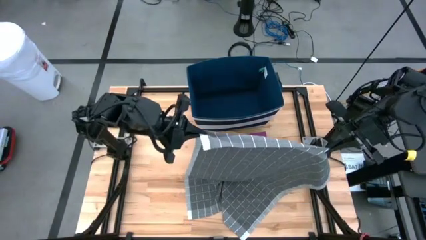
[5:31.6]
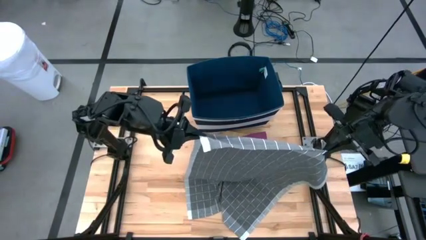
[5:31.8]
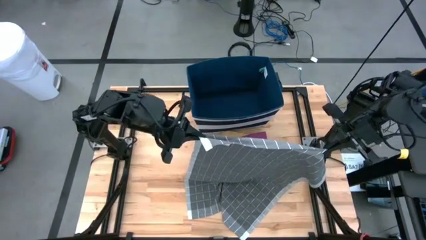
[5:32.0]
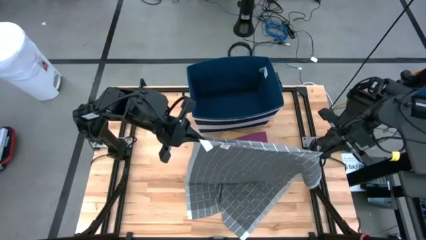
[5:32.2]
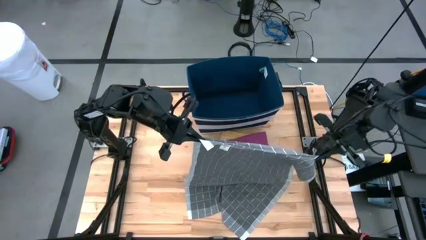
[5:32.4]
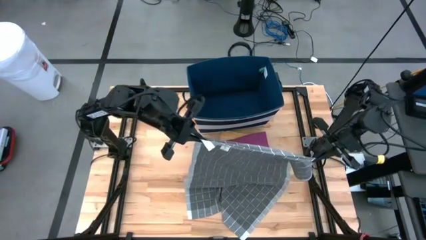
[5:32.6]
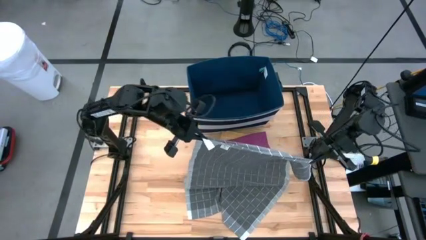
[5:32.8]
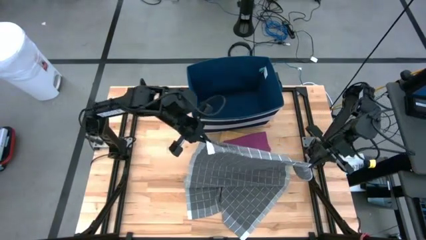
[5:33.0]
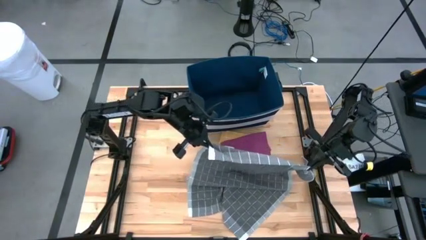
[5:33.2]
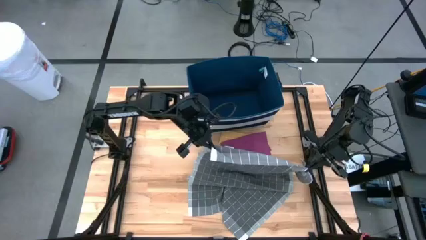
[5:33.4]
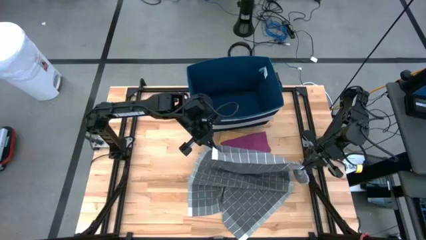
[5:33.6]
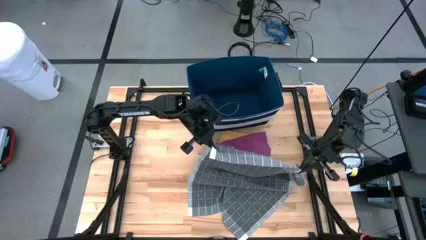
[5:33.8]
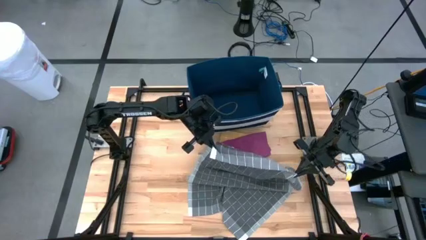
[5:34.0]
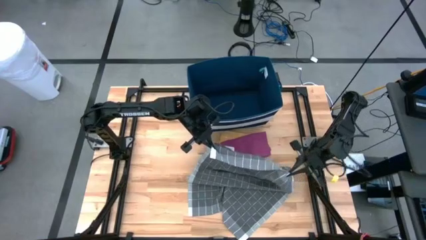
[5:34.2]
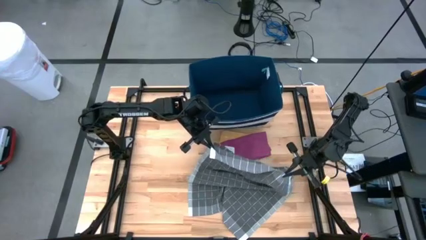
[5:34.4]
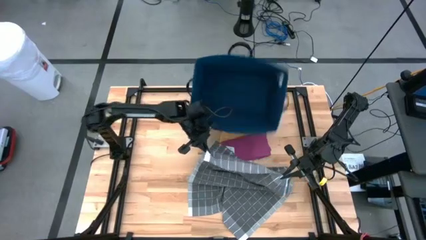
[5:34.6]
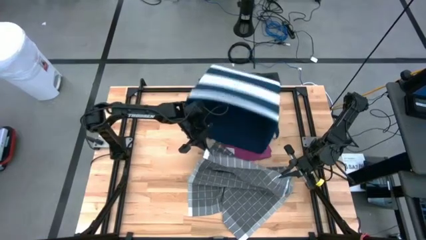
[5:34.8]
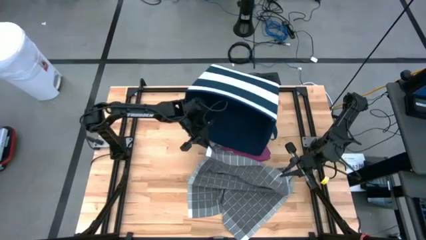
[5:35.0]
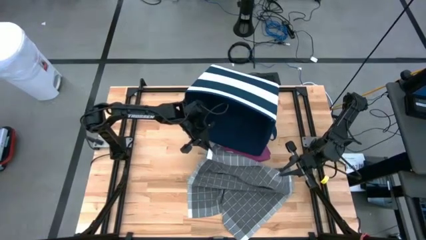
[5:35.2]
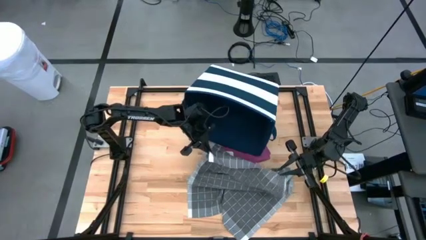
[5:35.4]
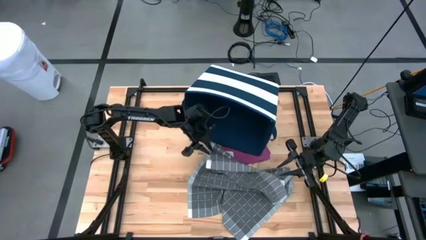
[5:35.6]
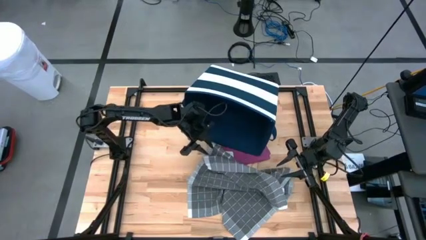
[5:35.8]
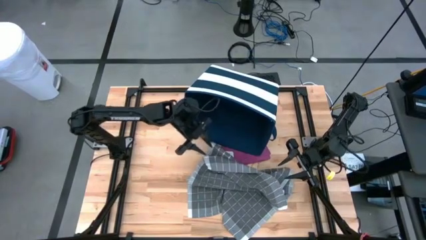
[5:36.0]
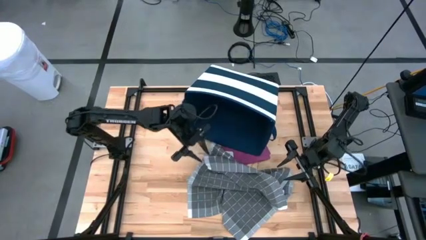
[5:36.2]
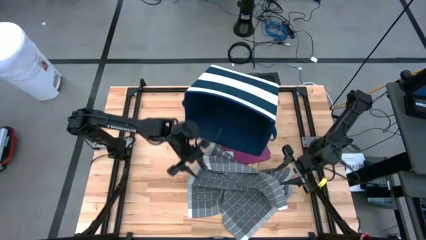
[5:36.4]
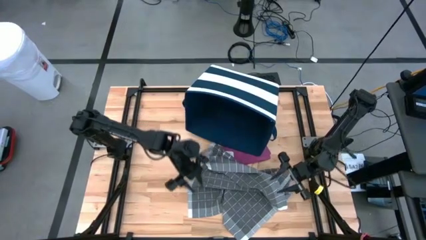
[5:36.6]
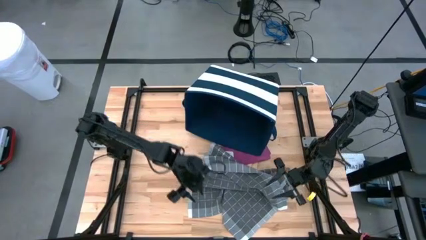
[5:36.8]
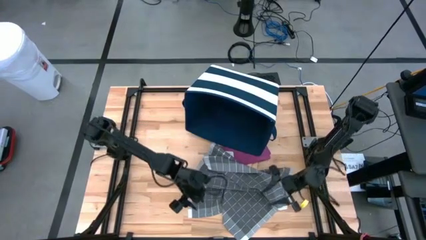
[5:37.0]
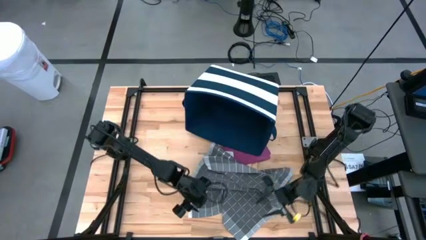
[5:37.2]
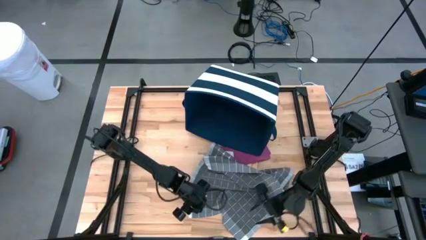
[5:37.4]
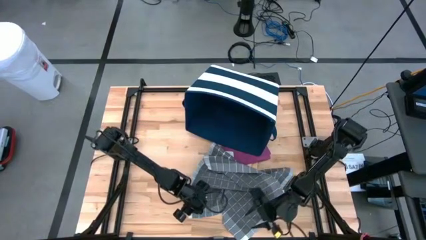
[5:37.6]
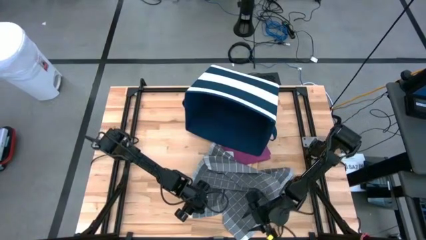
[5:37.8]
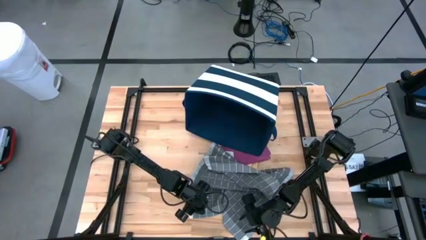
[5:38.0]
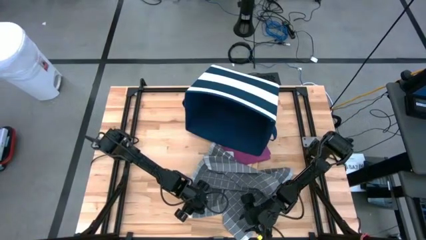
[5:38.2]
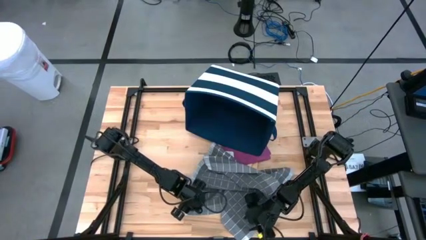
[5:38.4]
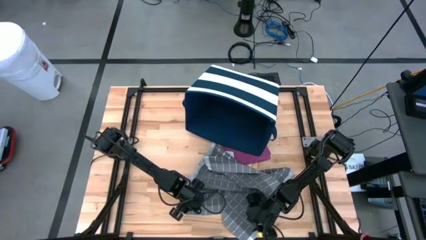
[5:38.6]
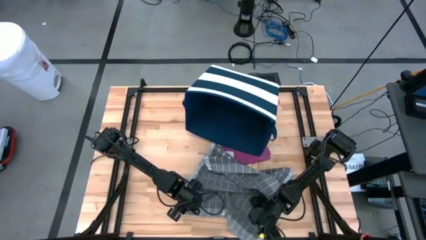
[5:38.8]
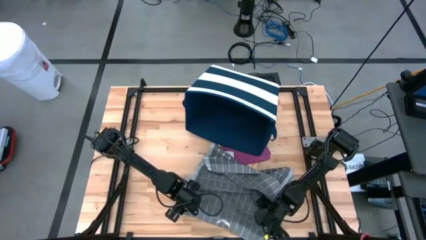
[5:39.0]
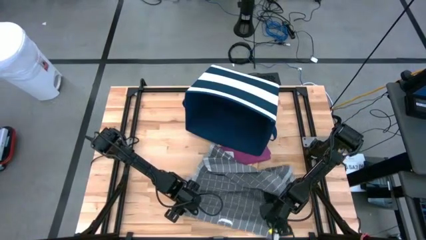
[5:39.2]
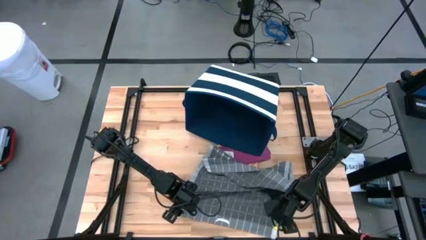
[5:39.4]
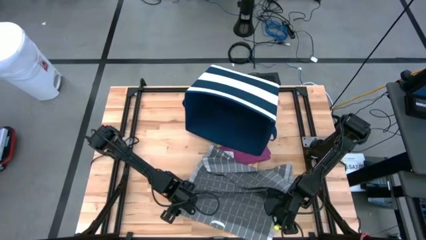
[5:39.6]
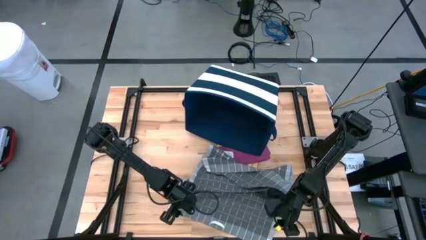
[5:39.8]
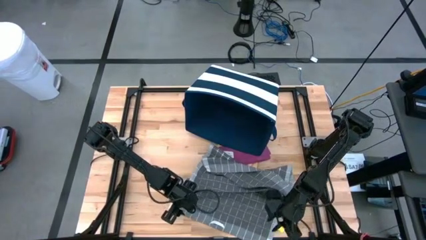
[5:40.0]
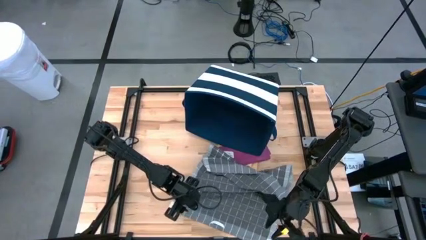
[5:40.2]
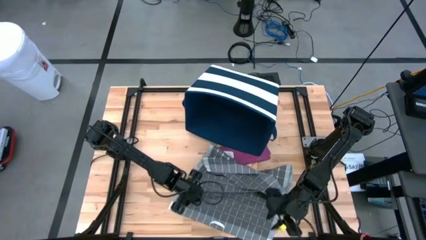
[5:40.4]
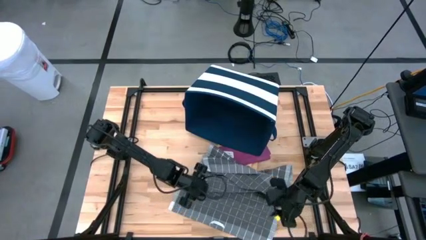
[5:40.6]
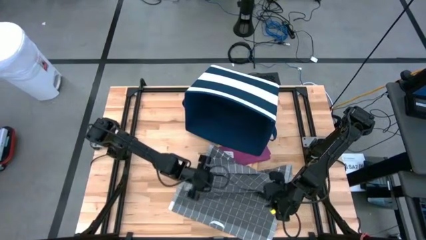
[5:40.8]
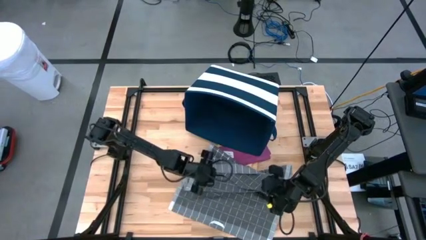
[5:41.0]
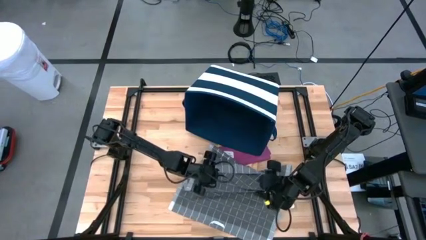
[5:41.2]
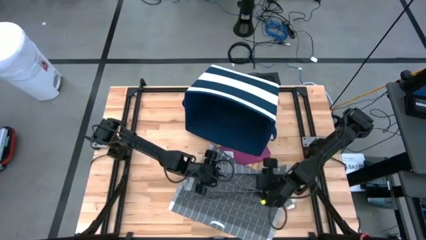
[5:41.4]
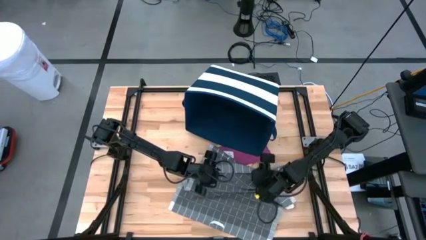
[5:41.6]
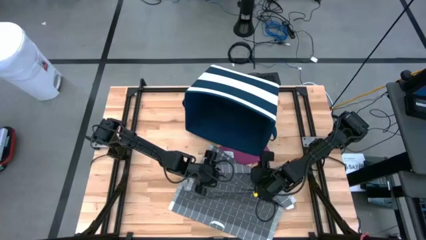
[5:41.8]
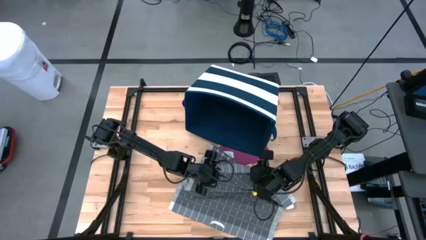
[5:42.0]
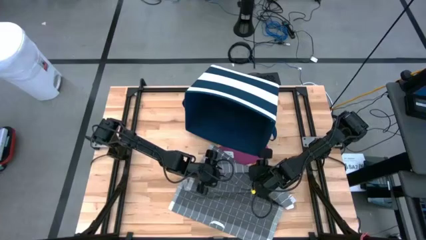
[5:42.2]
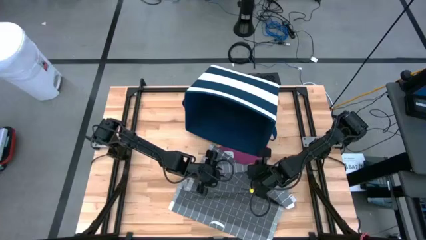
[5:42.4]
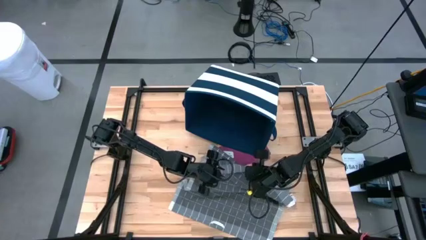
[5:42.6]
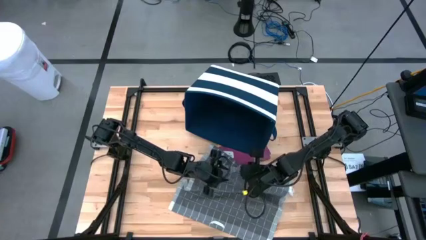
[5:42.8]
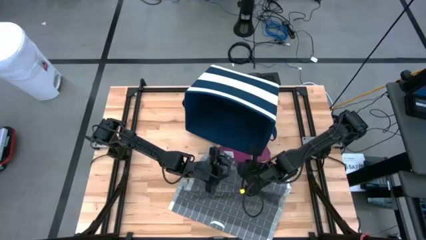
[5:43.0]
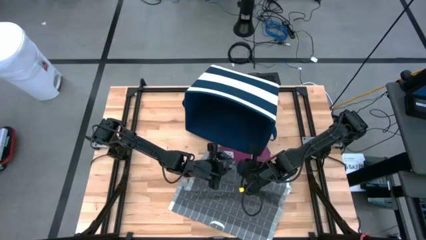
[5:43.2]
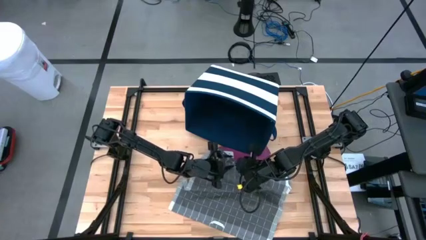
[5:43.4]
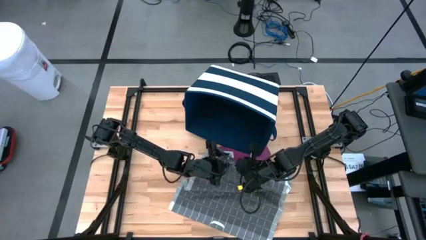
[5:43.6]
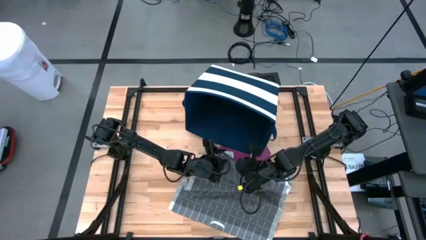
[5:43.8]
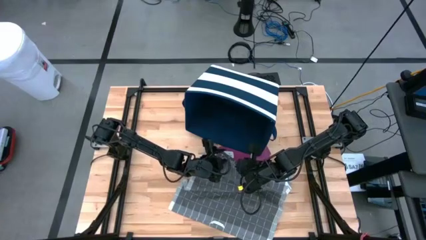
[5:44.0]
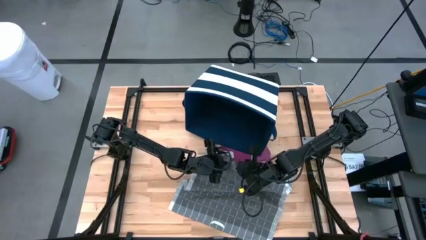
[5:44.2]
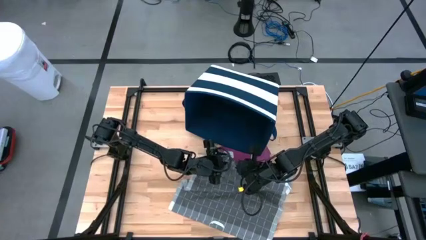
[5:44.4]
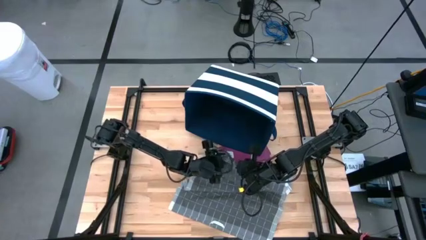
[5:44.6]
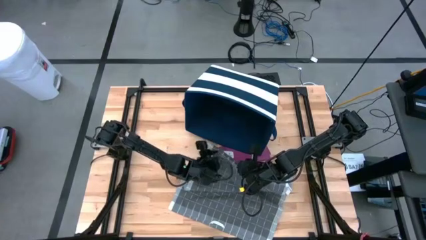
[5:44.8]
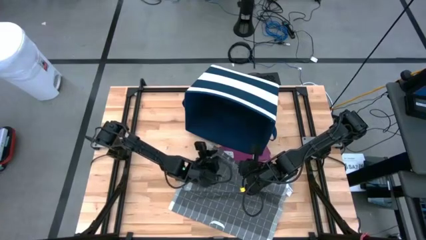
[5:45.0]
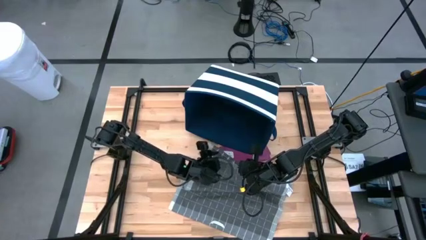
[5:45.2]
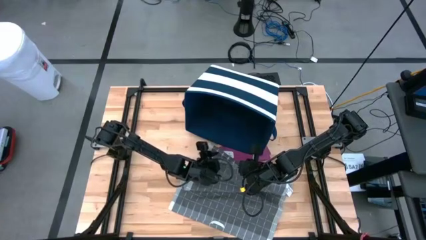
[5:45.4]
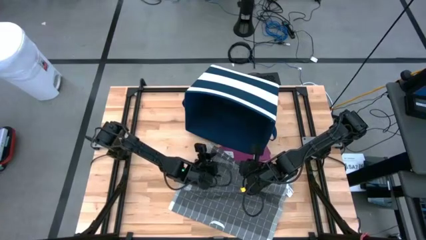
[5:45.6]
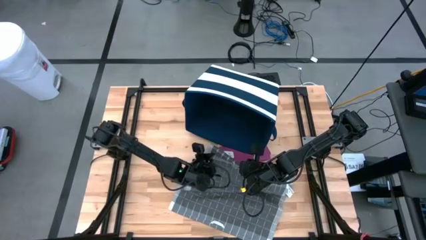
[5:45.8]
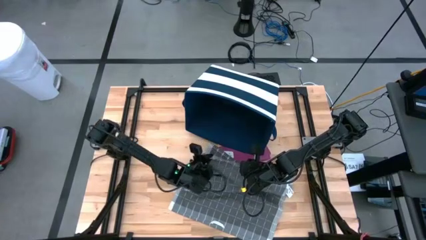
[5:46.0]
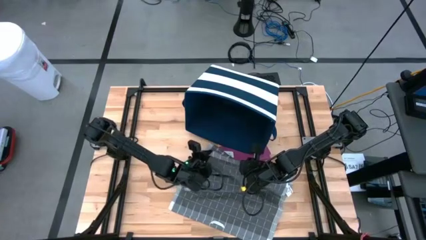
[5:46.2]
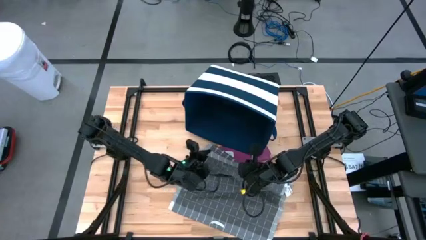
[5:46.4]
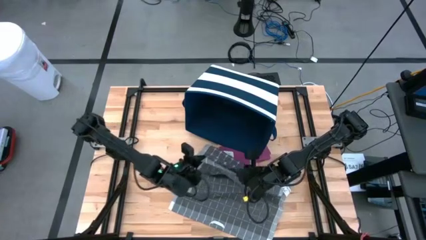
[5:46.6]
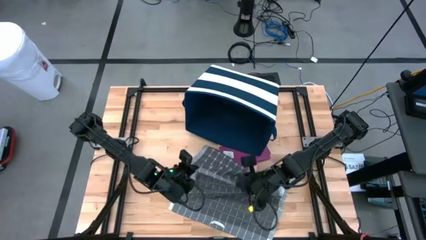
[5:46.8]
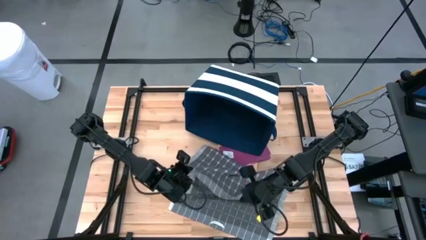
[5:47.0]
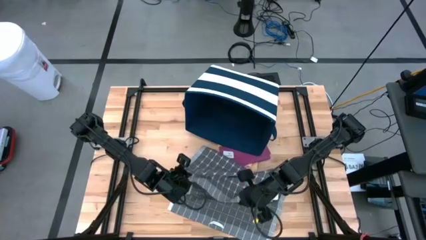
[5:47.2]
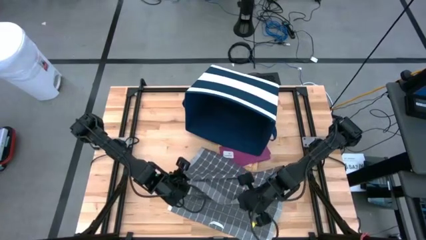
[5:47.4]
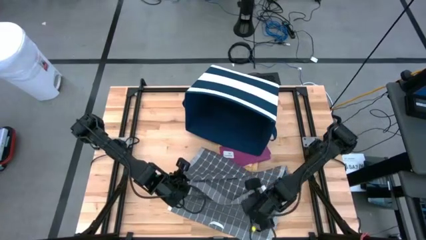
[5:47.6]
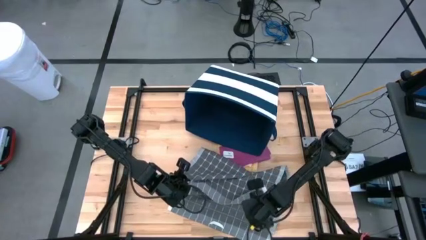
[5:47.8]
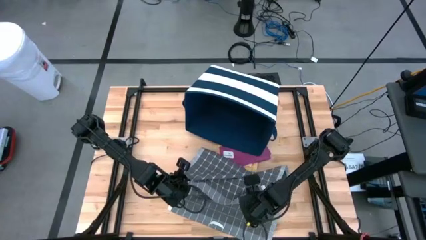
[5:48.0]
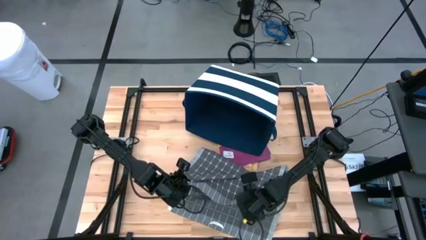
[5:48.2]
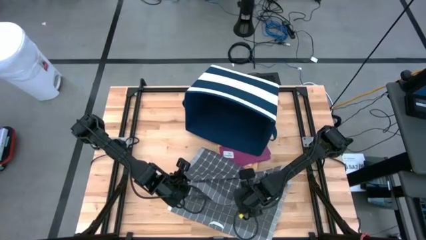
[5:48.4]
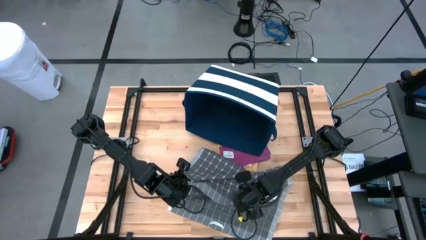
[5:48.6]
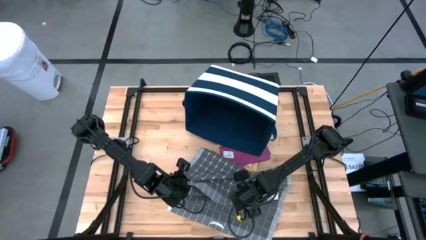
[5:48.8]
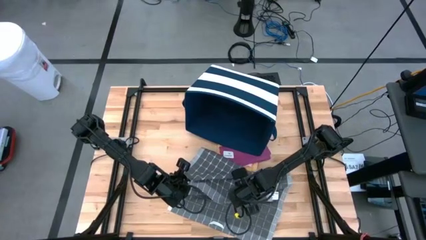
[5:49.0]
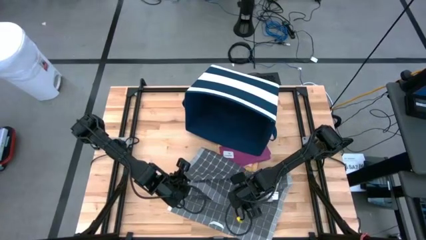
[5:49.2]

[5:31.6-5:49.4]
Task: Fold towel
Fold the gray towel
